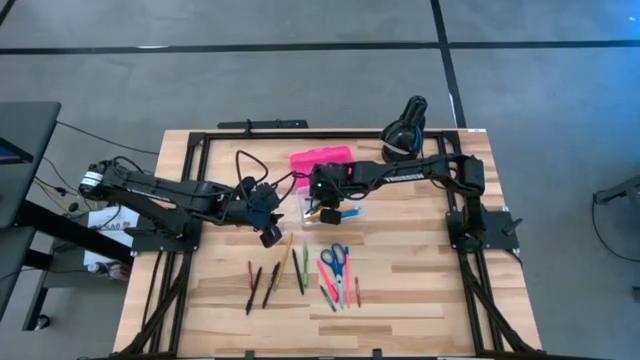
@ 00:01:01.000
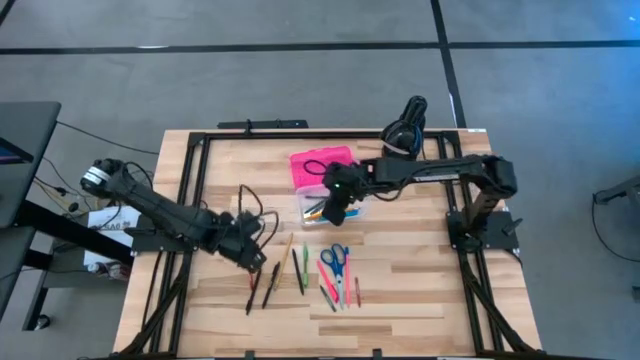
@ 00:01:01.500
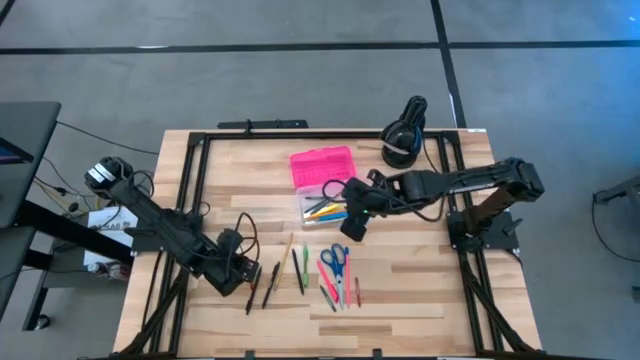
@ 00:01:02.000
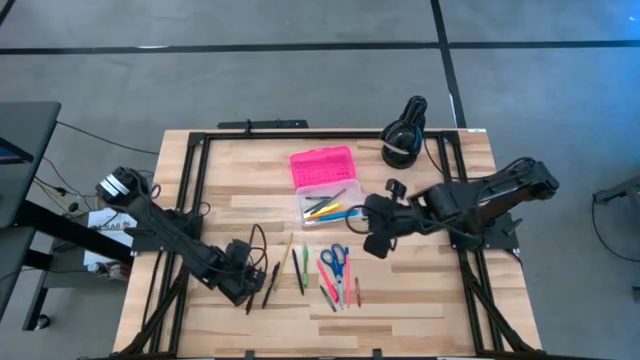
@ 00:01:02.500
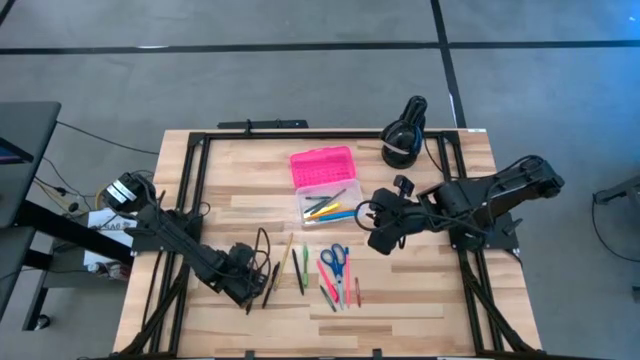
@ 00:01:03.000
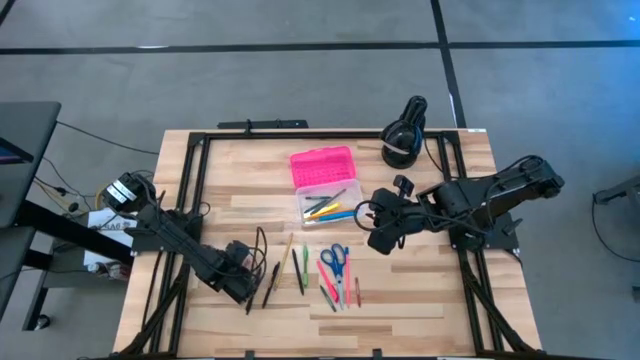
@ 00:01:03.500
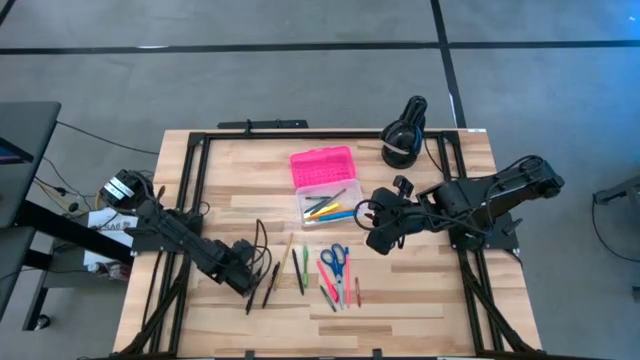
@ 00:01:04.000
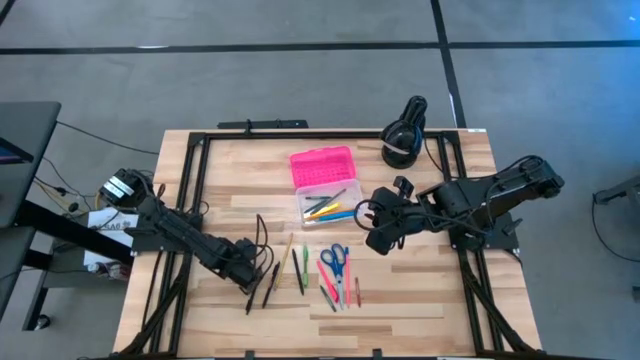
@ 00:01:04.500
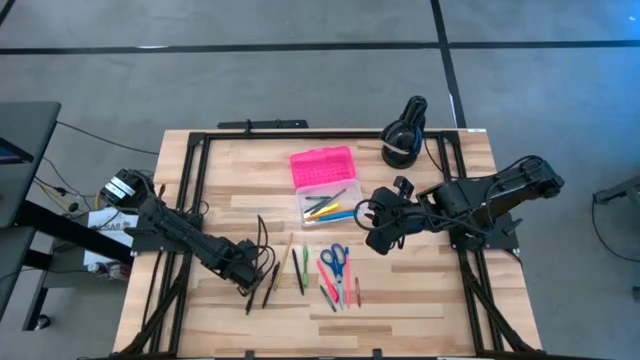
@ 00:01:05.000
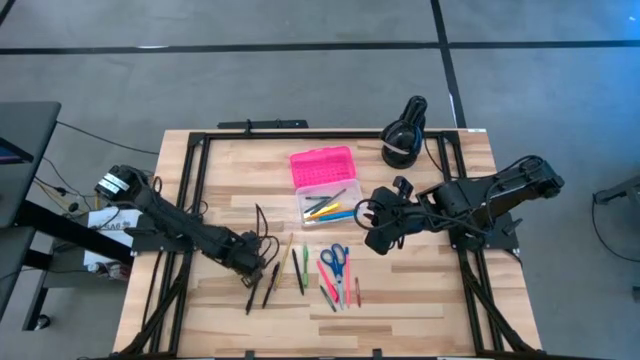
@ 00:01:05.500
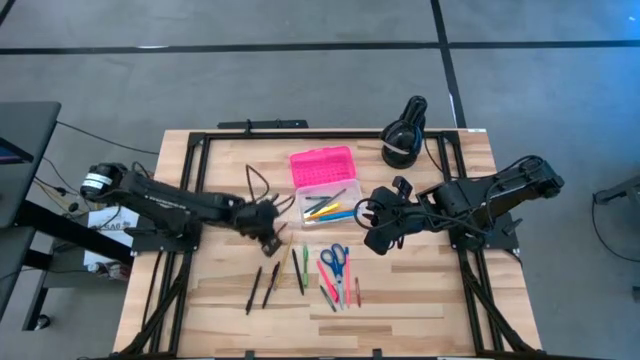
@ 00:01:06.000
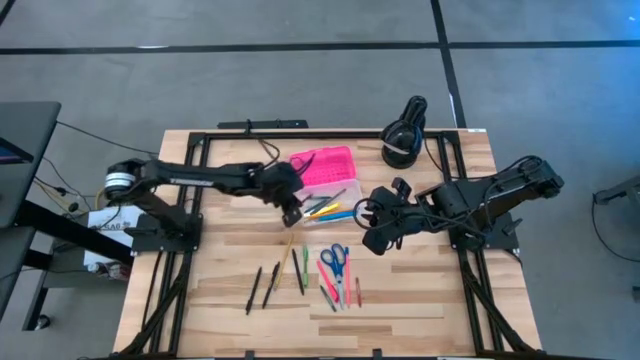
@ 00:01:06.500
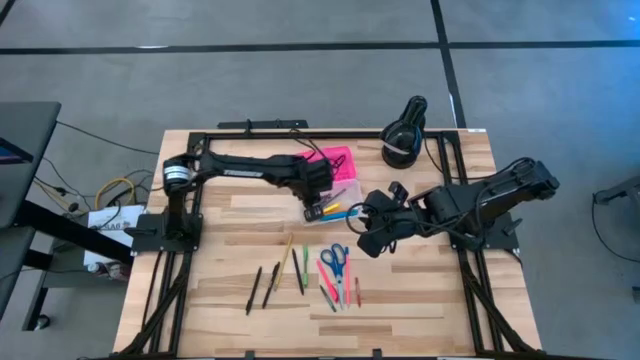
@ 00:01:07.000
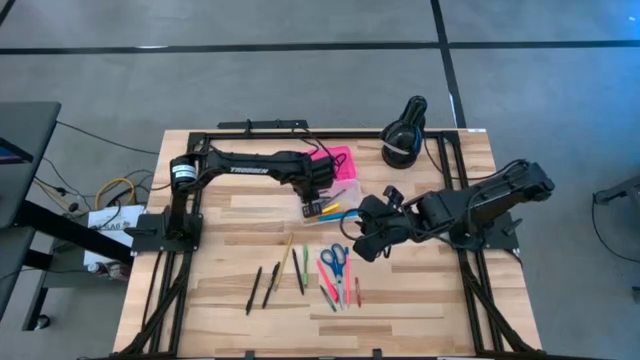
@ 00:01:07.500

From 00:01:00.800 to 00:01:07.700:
Task: Pick & place school supplies into a supply box
Put the red crayon into the pink supply box

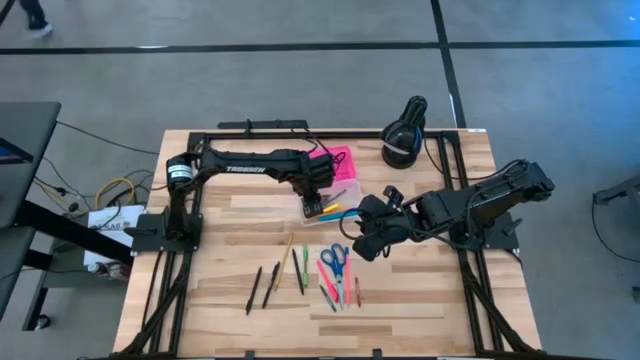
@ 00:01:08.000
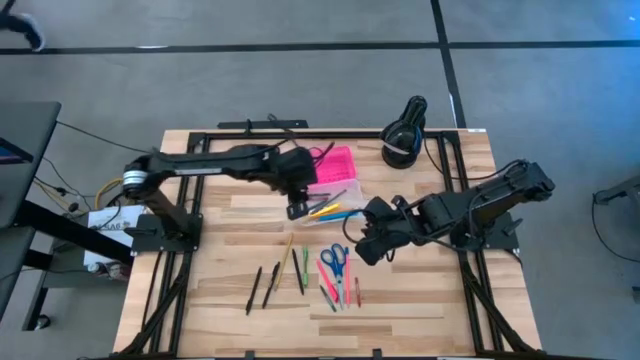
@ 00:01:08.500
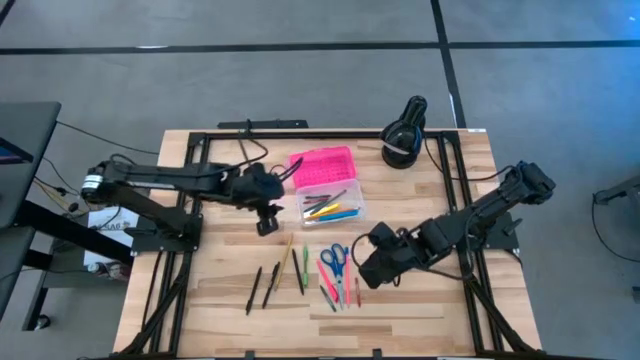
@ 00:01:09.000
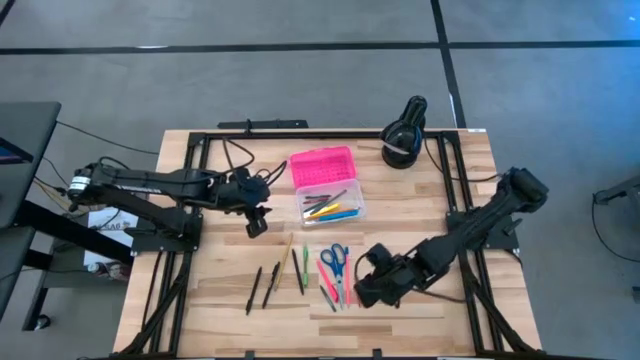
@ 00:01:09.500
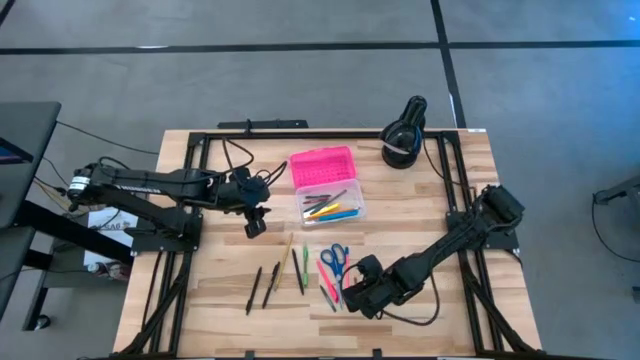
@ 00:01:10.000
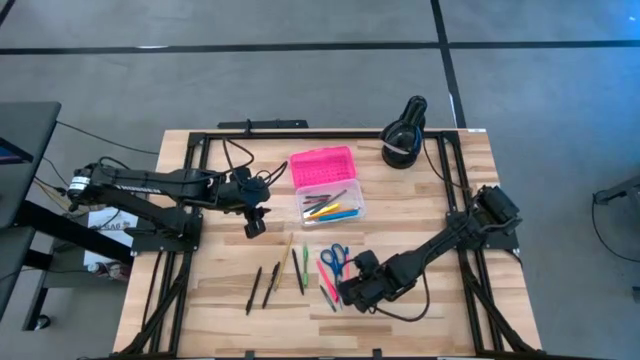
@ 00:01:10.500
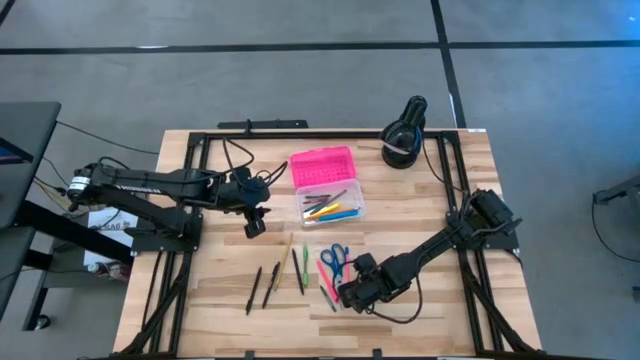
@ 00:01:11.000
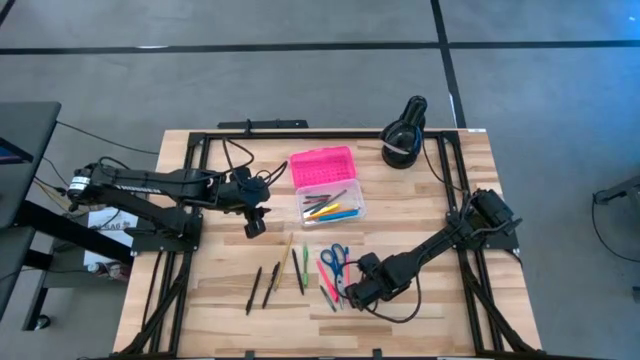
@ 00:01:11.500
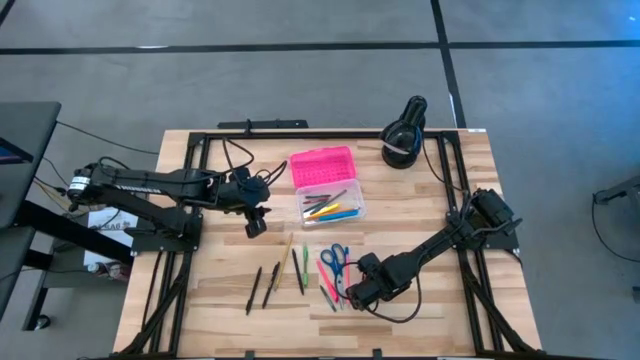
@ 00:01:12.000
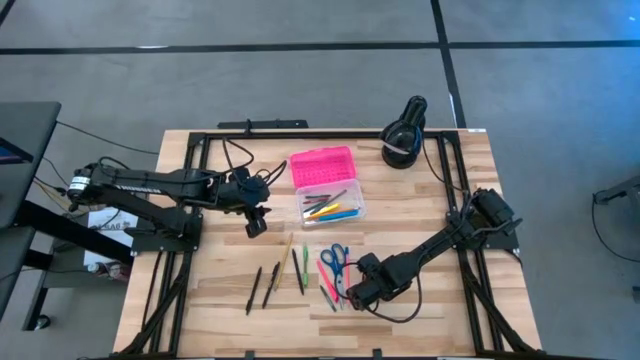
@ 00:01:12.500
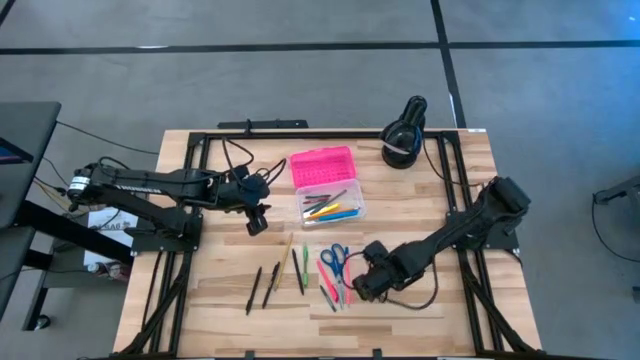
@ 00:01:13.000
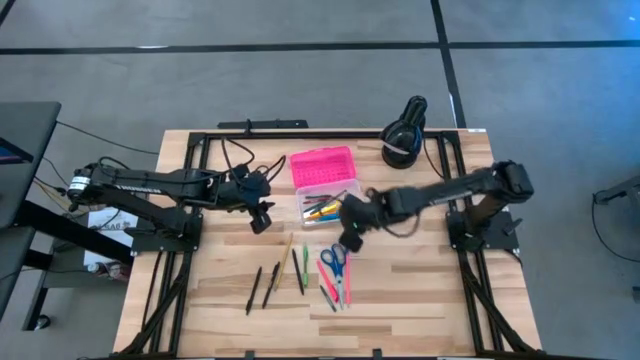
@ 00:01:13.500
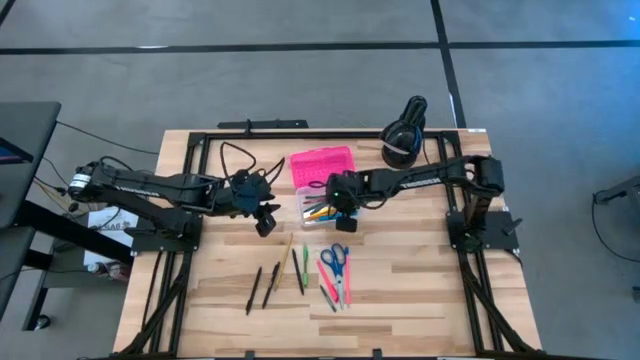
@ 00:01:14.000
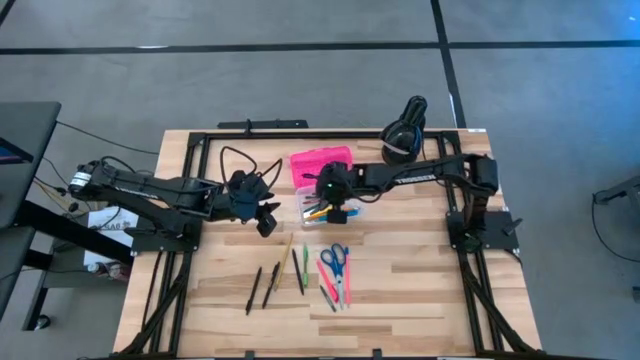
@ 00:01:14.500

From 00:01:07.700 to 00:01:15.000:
Put the red crayon into the pink supply box

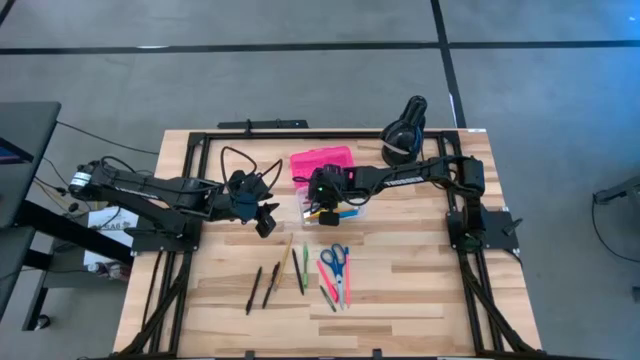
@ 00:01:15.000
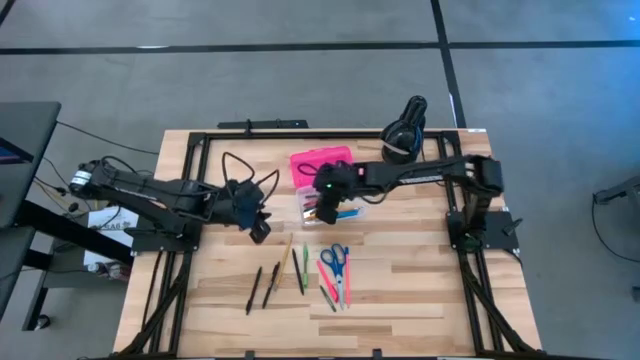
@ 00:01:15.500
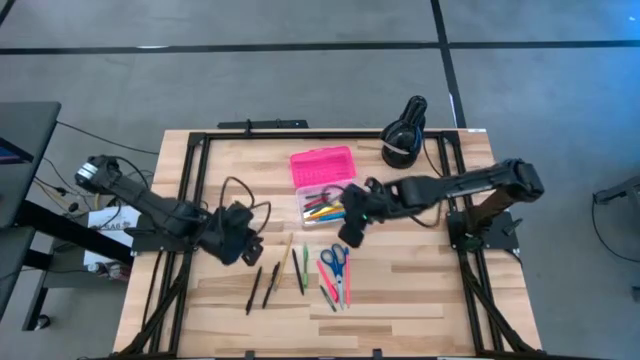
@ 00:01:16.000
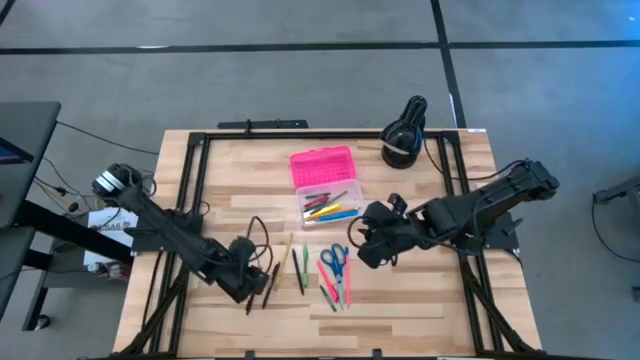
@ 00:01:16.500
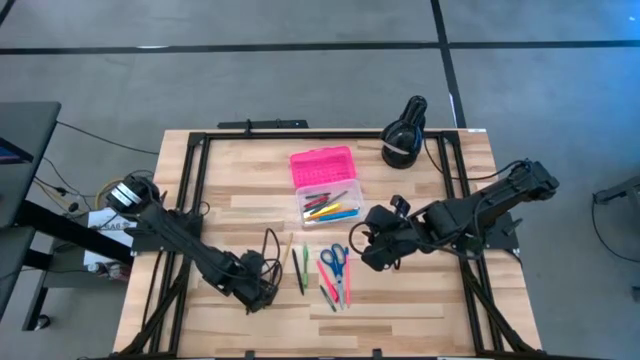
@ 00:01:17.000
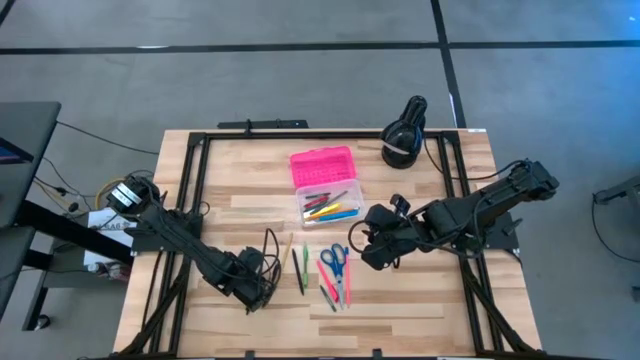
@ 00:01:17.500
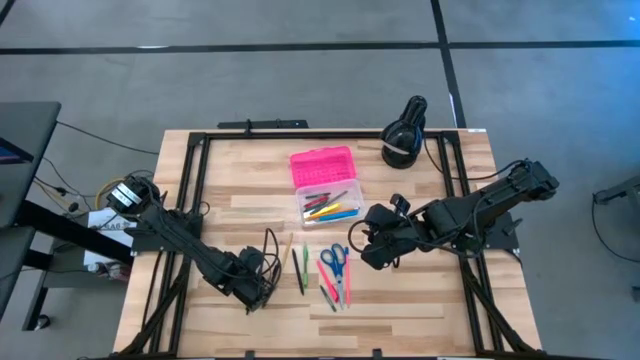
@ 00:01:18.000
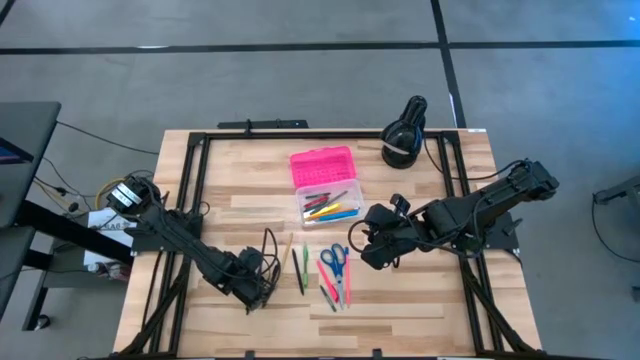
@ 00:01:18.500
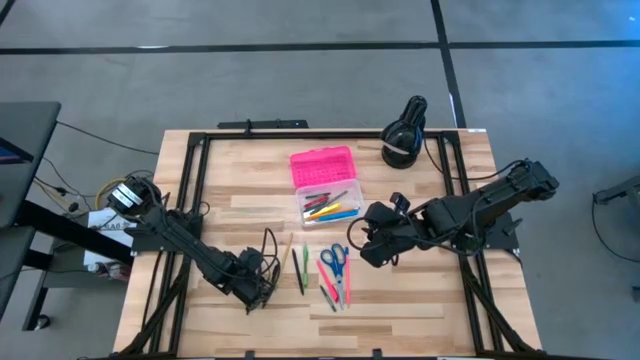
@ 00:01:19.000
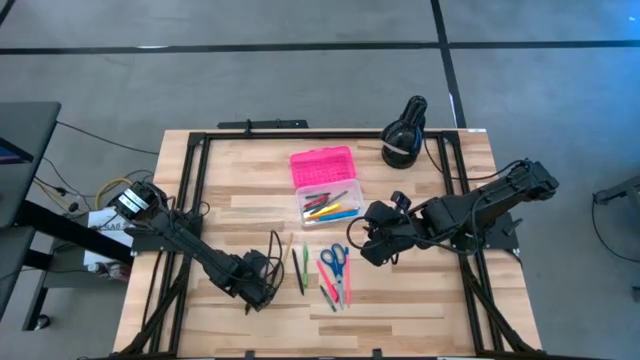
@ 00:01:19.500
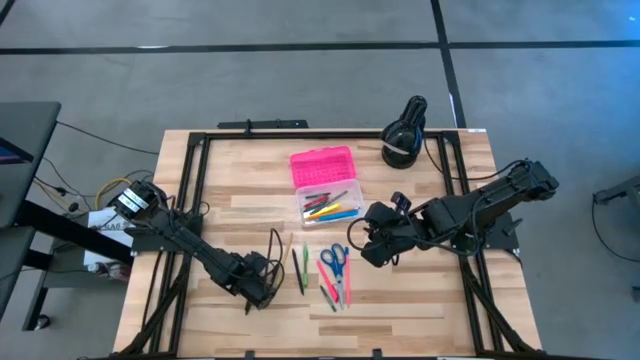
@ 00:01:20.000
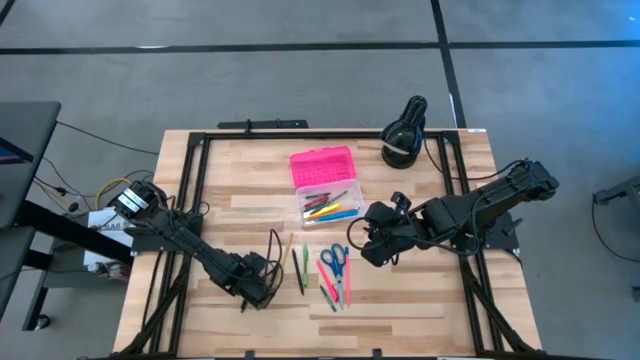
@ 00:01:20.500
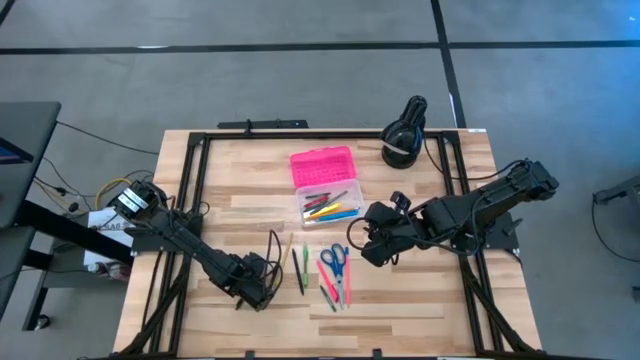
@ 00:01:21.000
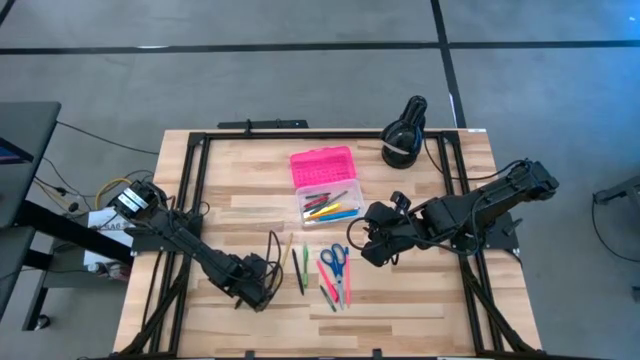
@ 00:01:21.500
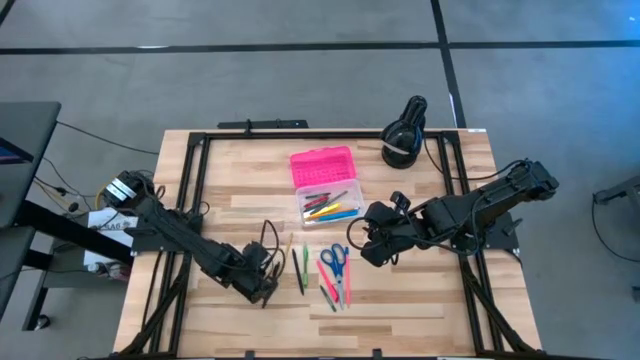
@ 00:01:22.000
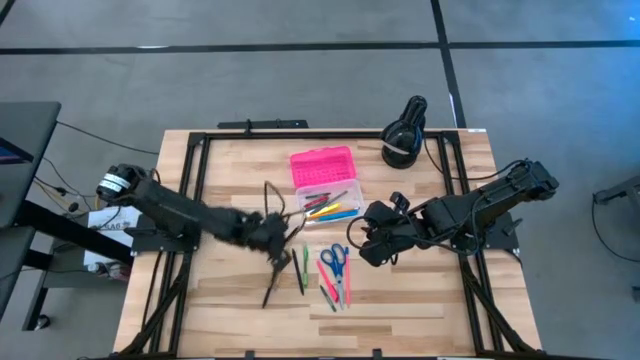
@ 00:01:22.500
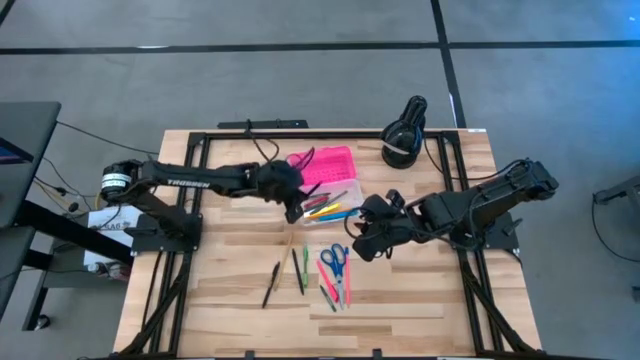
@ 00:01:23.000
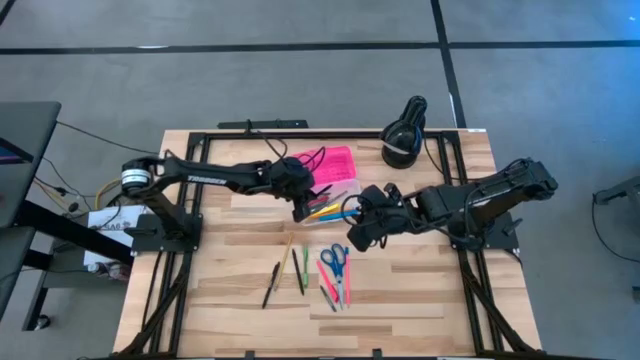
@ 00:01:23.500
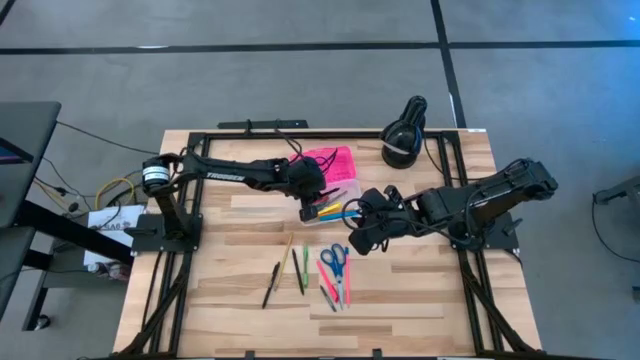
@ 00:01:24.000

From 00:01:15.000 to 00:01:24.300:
Put the black pen into the pink supply box
